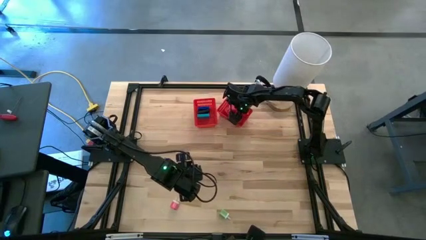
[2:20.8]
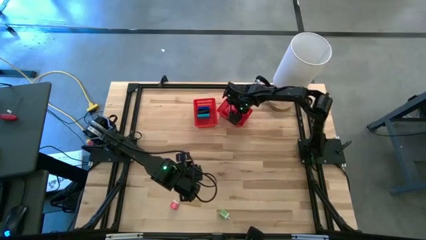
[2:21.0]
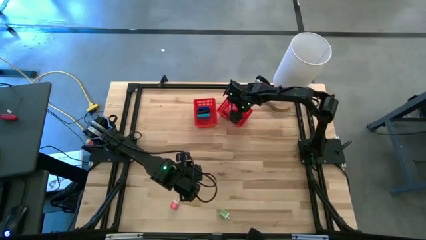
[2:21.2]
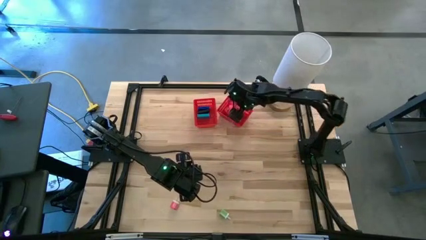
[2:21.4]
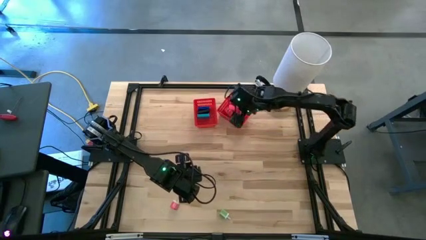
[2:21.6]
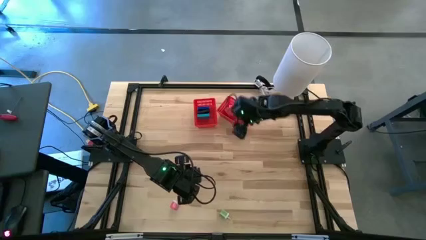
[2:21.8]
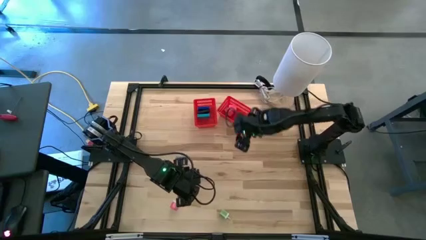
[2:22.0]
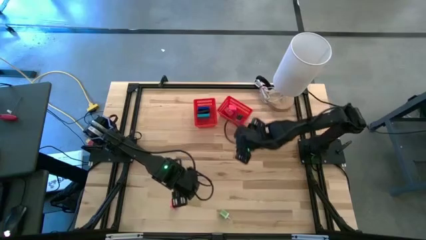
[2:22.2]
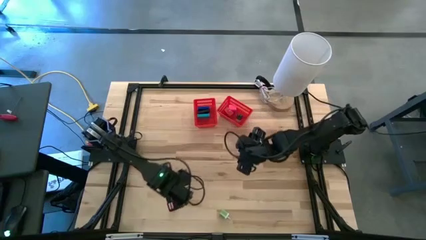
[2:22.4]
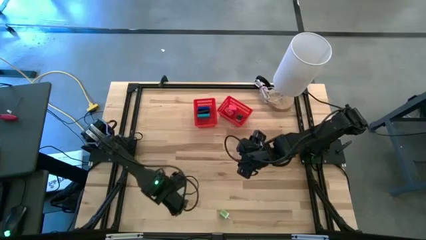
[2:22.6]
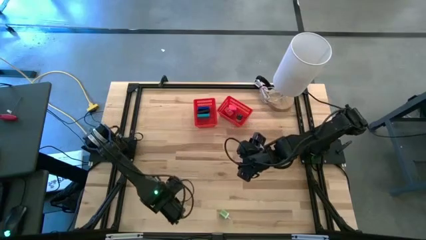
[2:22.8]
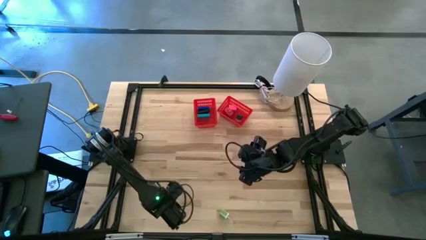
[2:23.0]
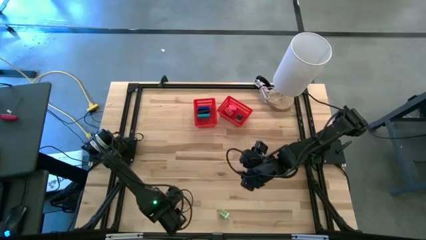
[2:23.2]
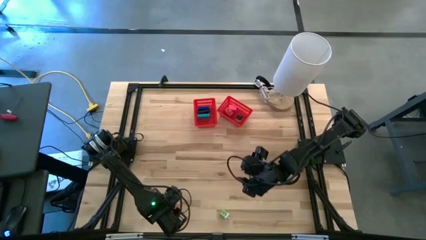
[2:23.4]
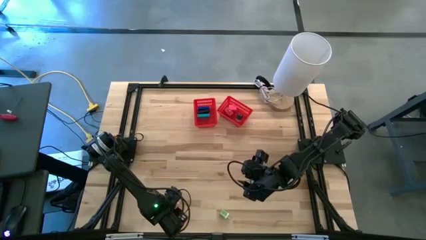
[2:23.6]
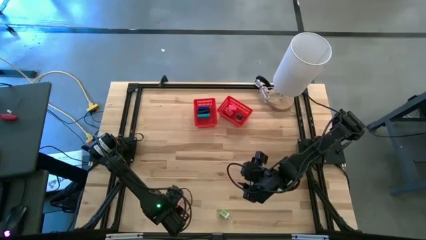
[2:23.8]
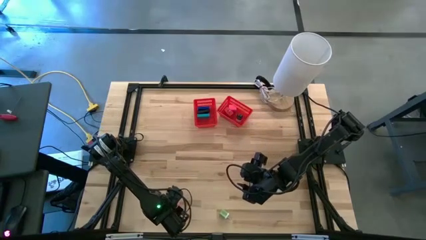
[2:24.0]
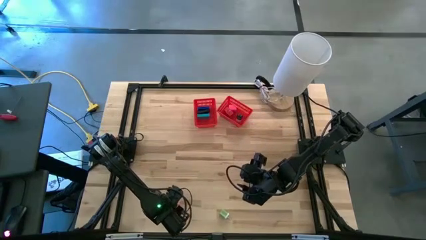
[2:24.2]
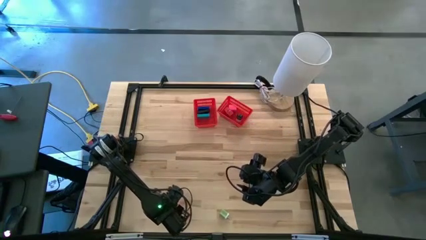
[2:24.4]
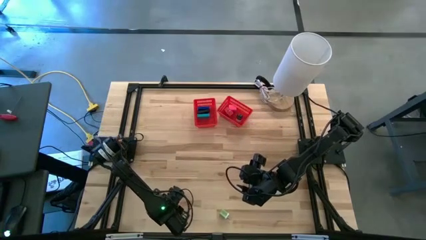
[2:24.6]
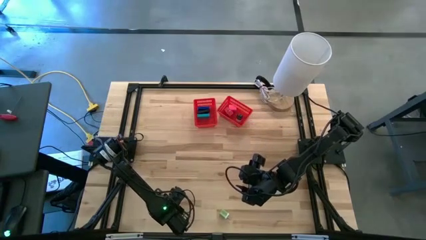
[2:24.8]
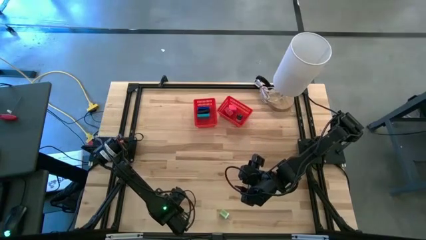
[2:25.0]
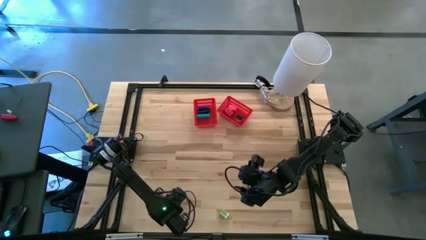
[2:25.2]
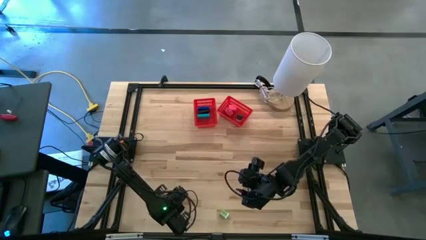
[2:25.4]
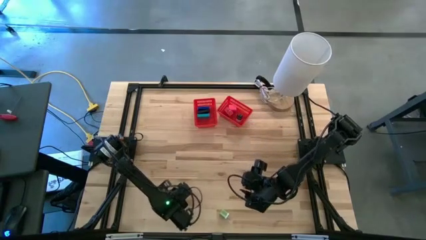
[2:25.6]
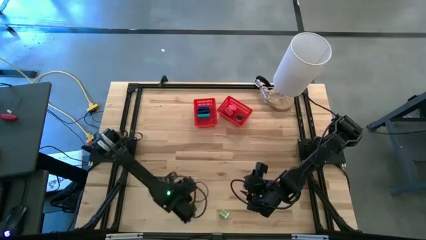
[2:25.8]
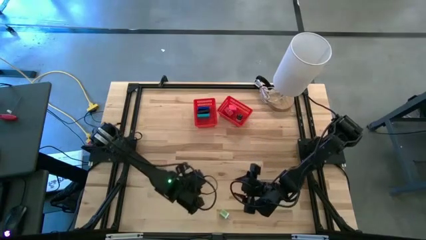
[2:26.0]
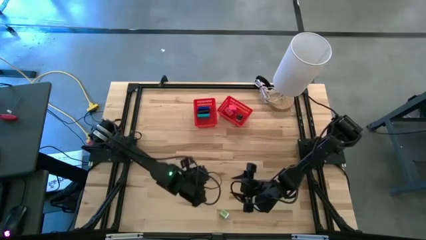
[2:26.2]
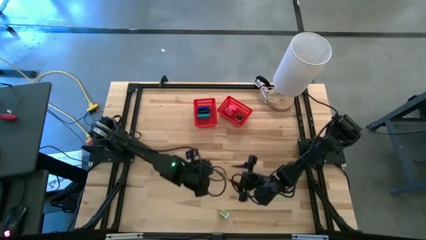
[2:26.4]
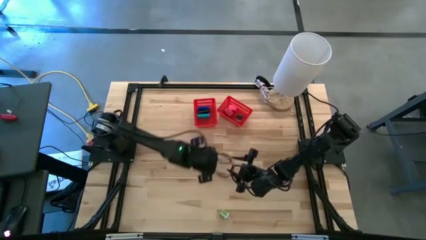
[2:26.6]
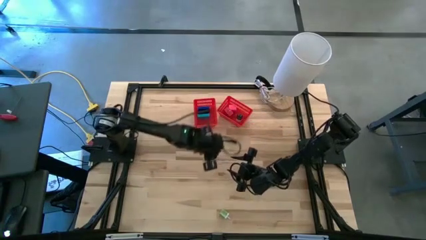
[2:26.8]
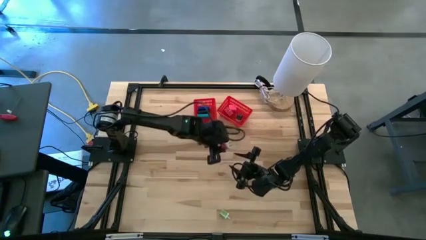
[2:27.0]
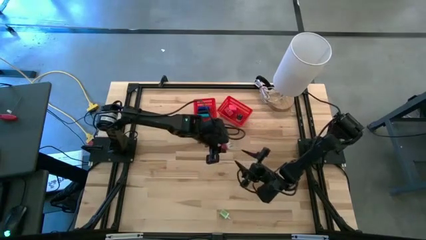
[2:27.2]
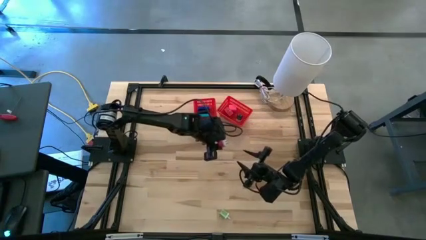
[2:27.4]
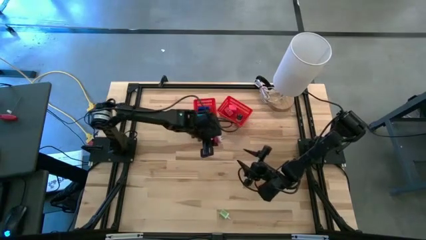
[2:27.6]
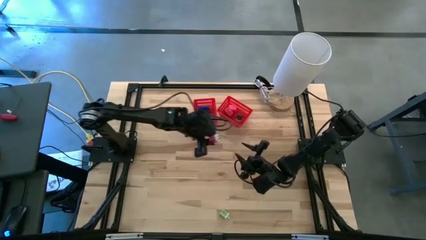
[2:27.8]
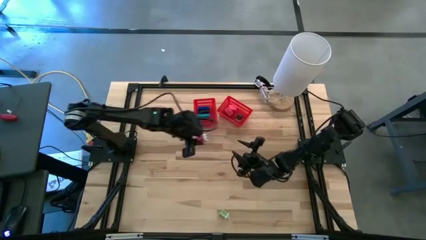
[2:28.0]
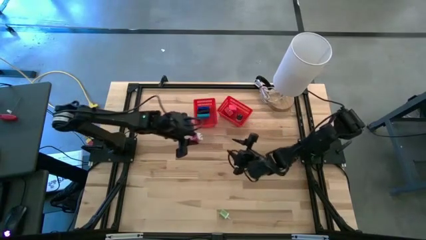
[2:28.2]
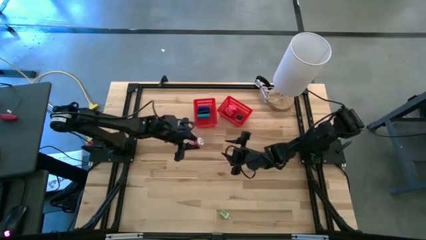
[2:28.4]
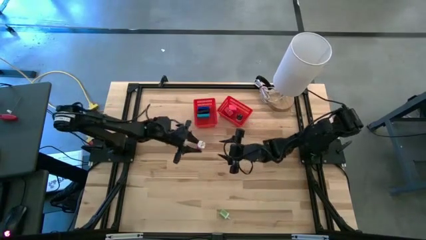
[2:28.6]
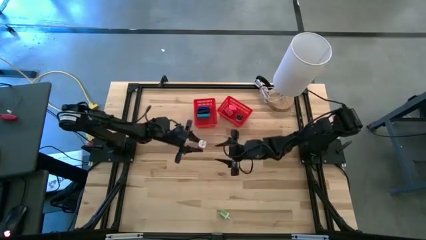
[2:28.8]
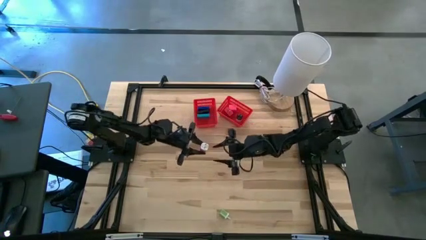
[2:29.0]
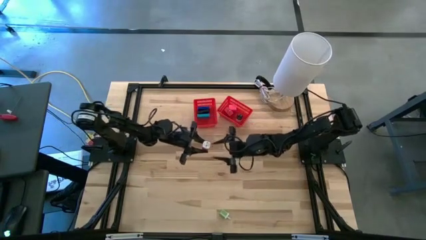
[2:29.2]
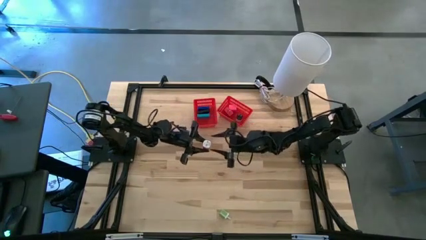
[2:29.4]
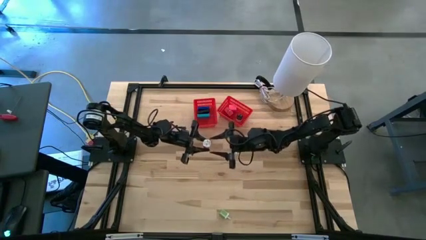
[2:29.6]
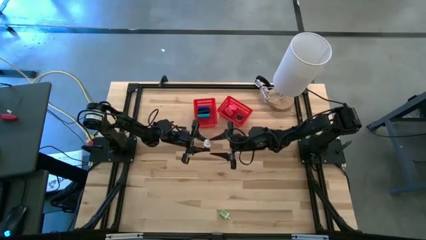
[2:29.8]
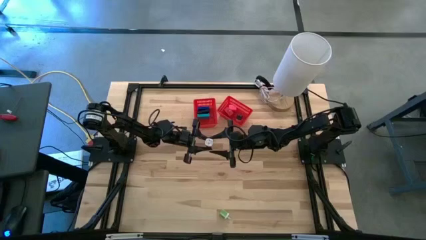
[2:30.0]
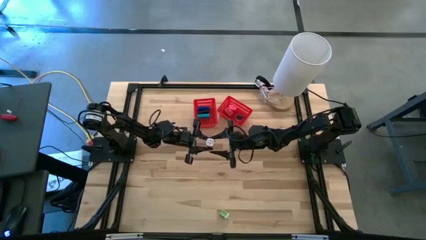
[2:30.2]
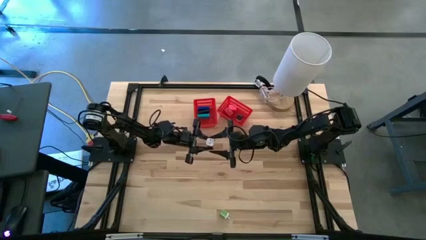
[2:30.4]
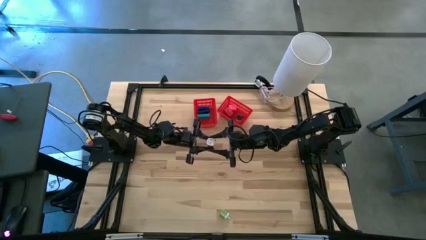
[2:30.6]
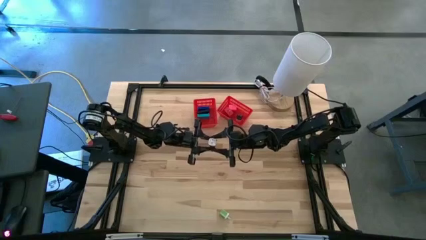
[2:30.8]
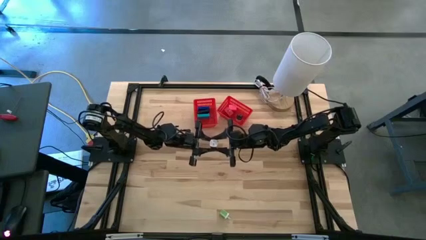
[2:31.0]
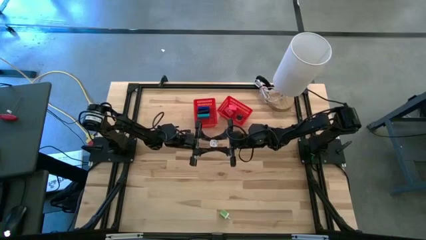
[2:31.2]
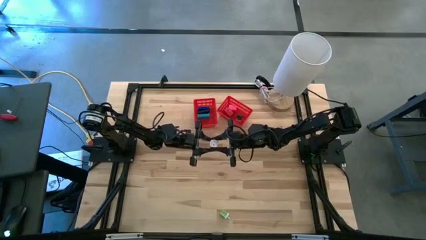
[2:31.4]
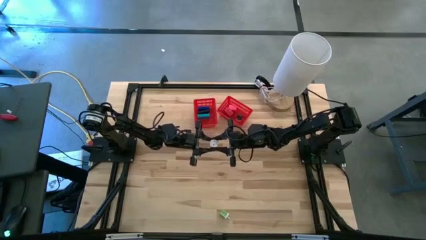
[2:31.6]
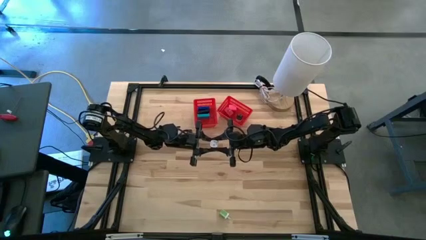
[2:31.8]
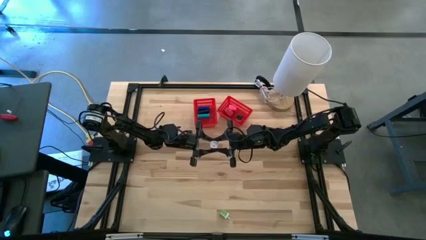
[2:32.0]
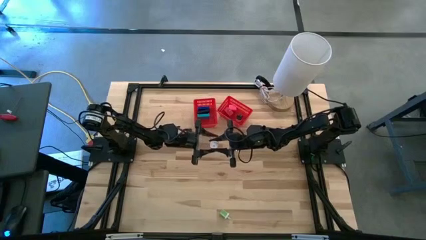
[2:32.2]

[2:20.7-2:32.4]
Task: Pick & Place Office items
Put the pink and white charger adapter into the right red bin
